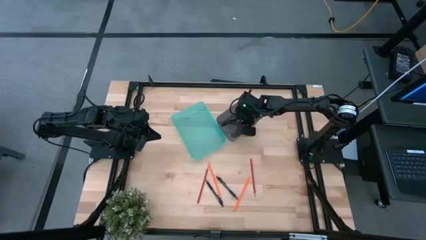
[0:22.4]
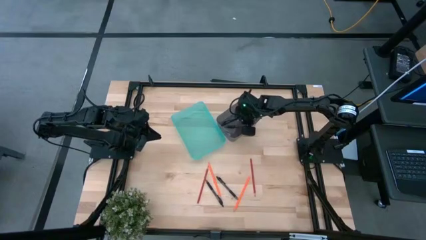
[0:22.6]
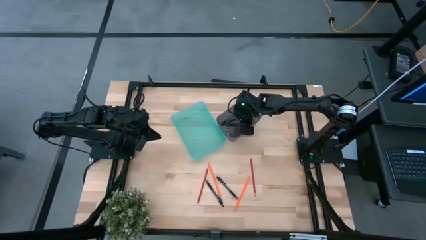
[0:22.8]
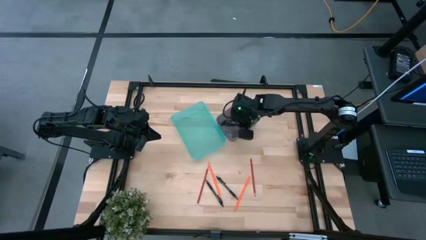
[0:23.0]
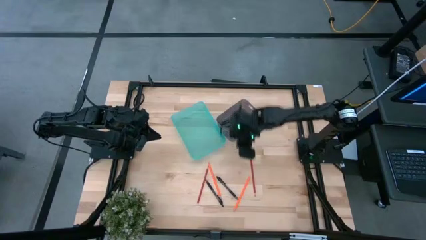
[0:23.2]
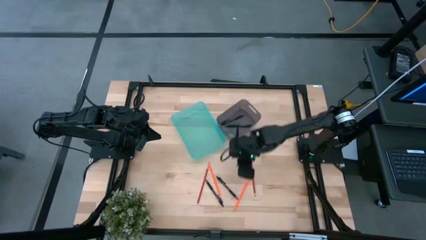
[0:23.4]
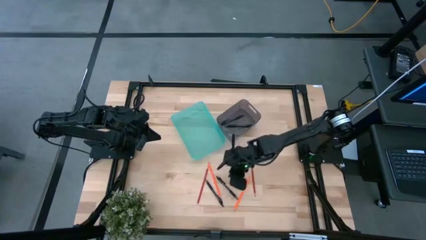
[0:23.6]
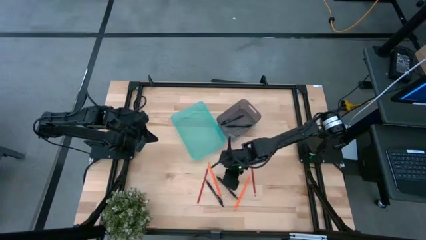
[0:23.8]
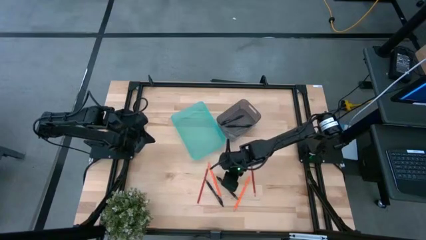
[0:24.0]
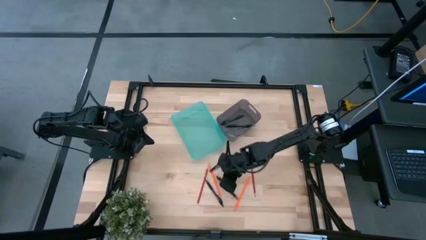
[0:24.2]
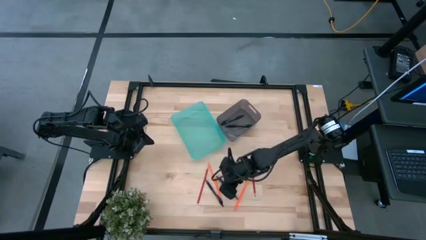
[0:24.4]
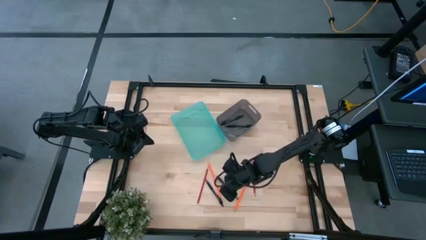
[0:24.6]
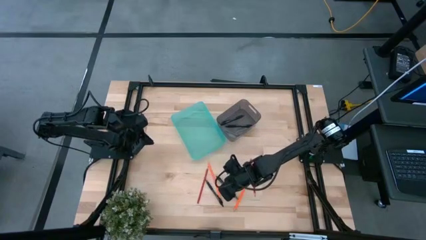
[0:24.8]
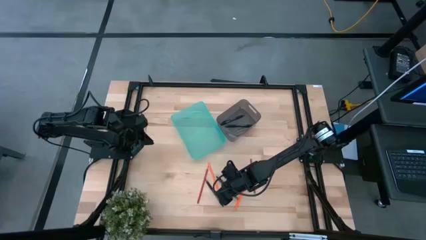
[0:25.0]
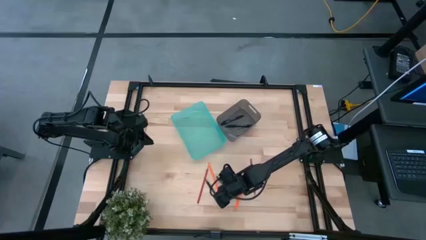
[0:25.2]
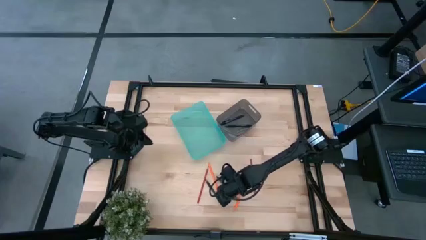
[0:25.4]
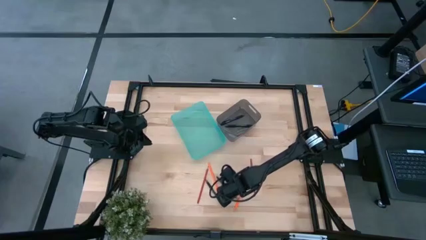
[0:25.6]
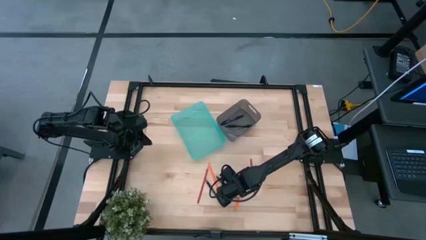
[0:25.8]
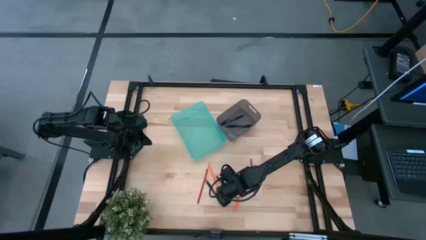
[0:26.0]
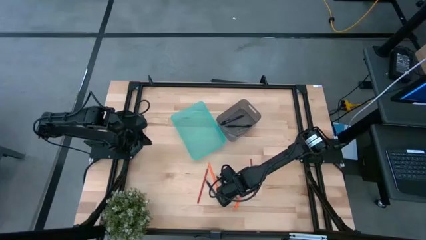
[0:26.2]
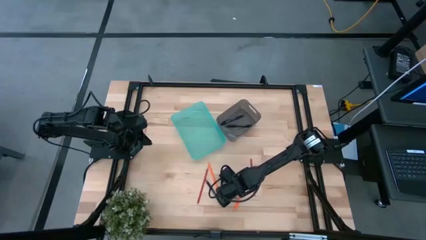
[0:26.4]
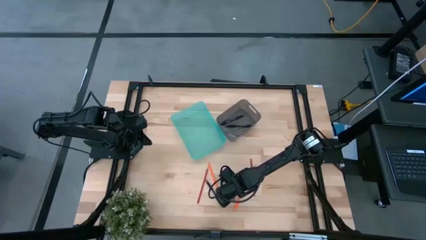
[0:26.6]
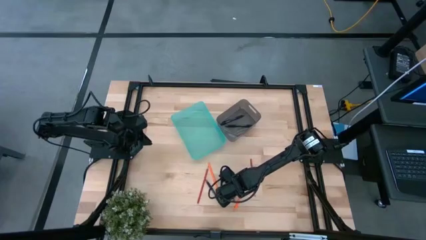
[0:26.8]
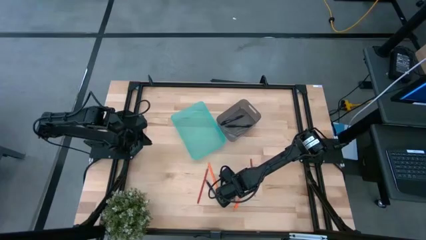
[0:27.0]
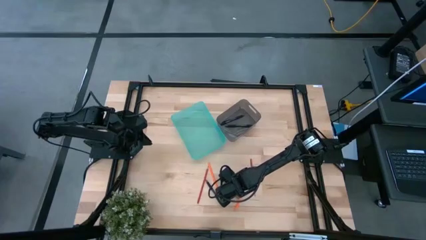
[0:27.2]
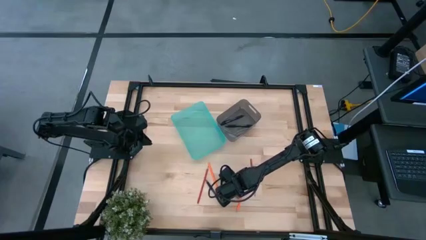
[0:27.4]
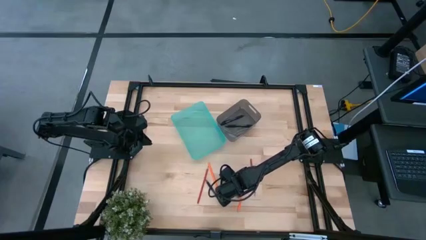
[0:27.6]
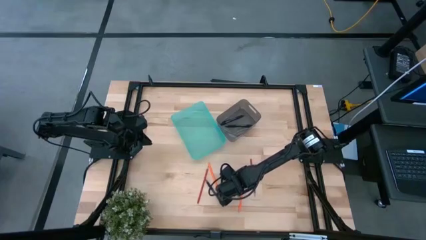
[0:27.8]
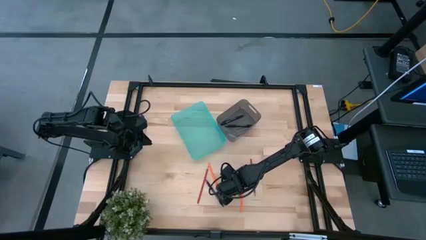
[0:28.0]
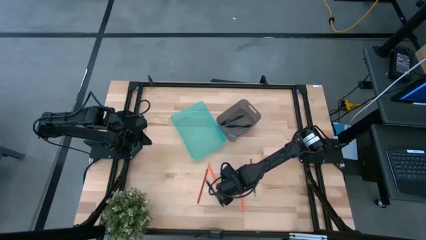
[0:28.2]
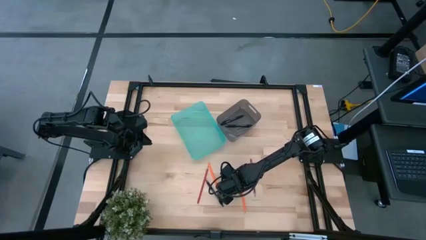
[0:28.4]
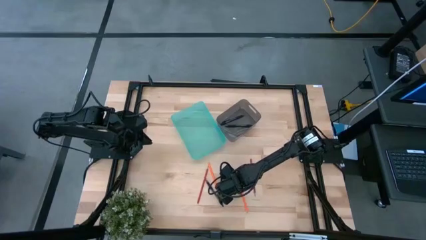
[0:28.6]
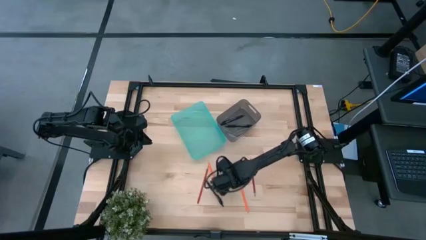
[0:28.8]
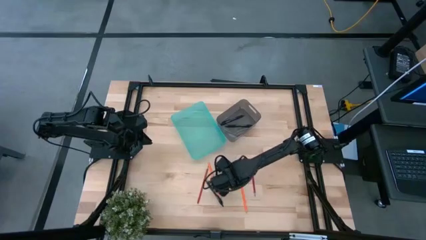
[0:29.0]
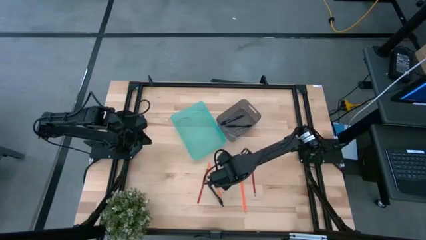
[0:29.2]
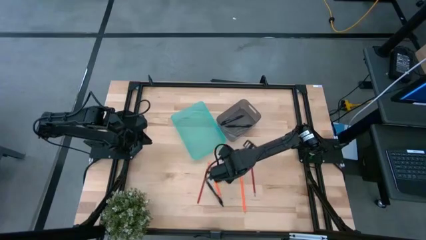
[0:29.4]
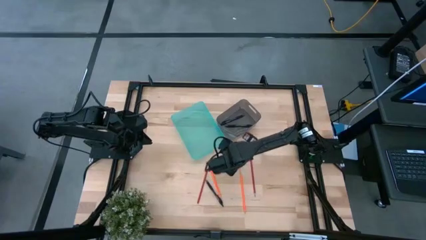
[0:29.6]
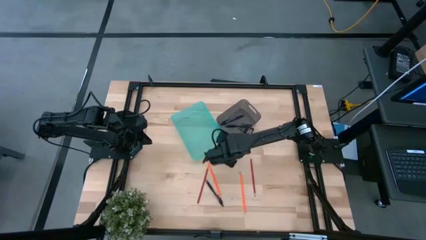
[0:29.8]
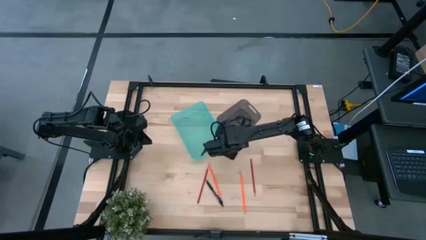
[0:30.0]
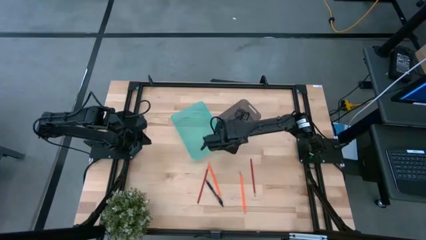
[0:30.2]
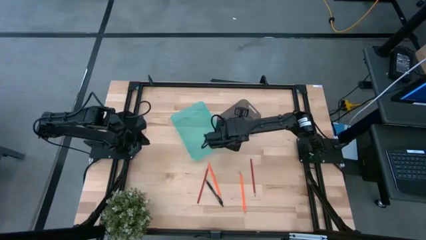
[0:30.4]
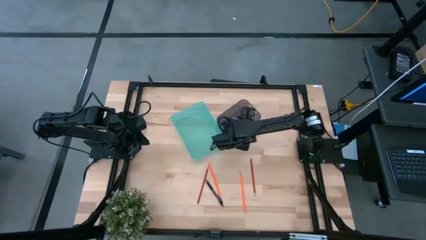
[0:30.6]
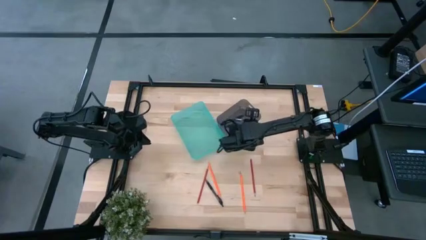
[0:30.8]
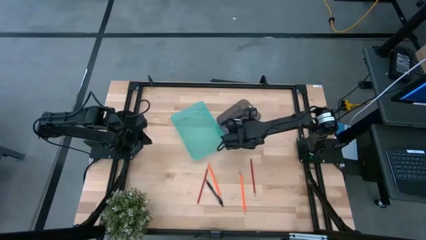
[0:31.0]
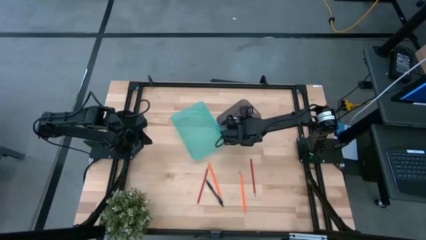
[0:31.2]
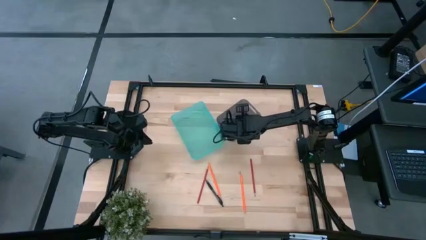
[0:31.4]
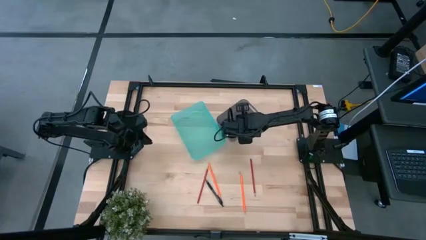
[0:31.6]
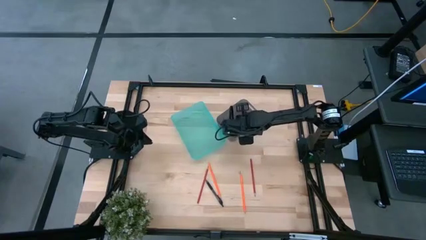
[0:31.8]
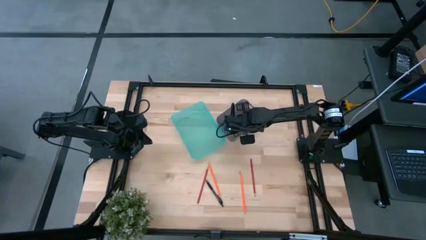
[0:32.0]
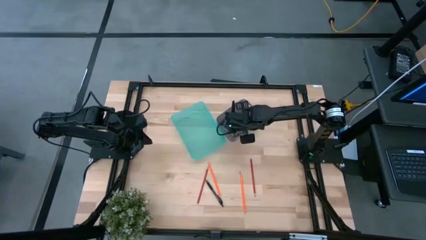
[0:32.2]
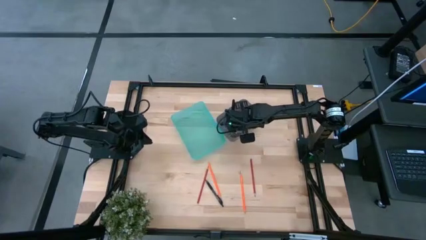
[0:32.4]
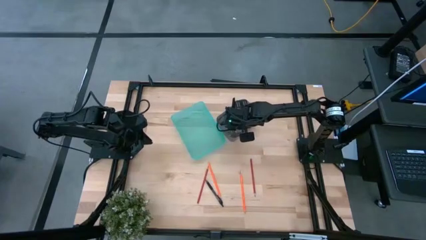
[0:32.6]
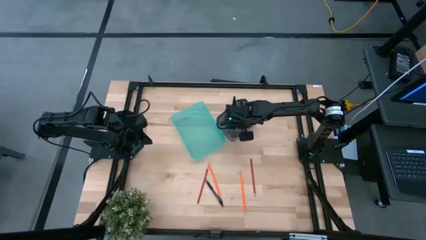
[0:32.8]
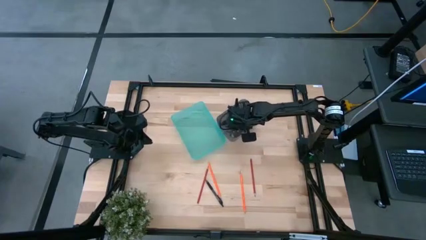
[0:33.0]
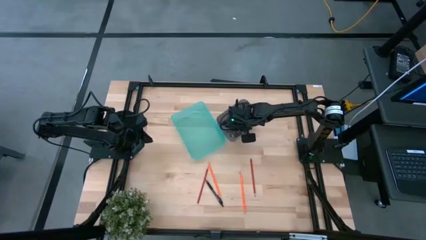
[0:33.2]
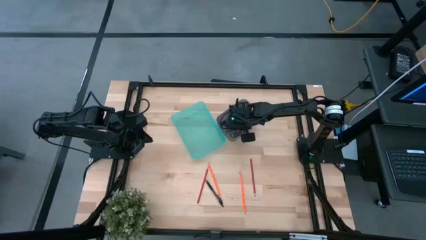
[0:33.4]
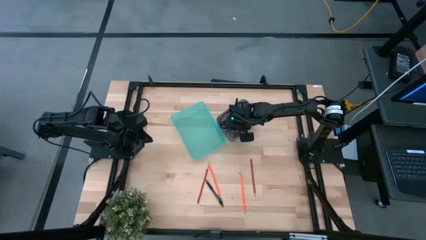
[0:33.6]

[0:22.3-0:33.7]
Task: Sort pens & pencils
Put the right black pen into the black bin
